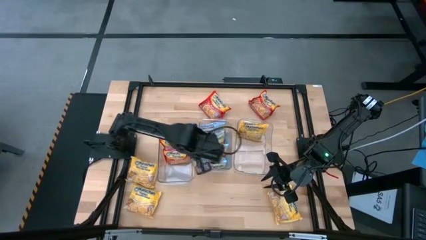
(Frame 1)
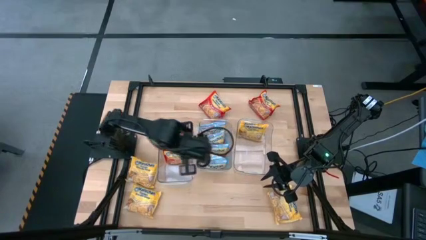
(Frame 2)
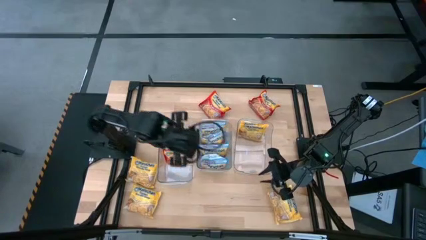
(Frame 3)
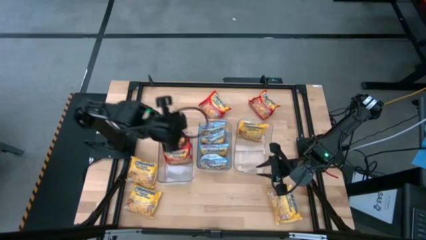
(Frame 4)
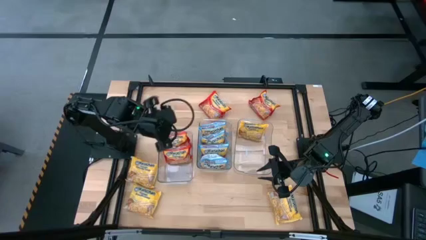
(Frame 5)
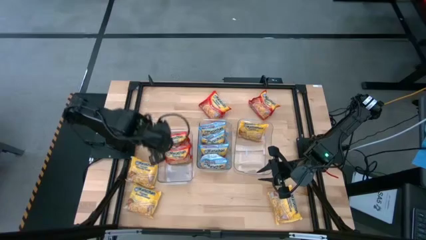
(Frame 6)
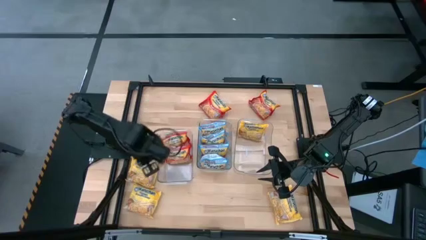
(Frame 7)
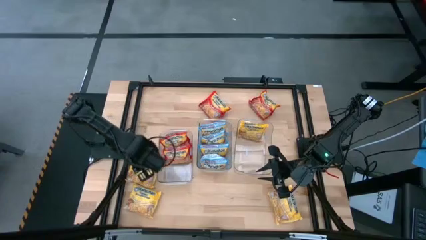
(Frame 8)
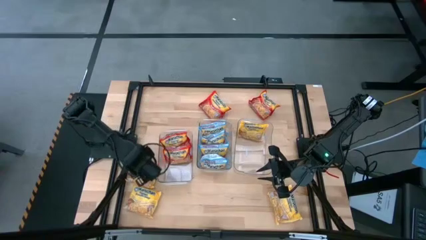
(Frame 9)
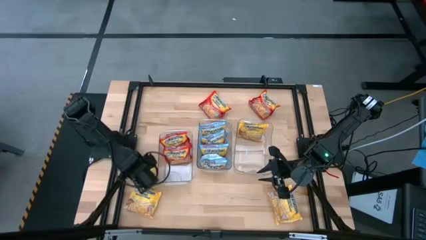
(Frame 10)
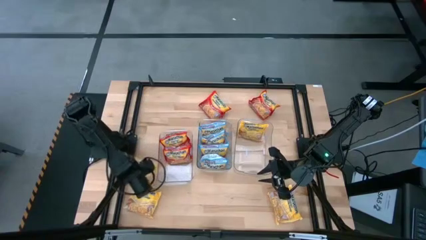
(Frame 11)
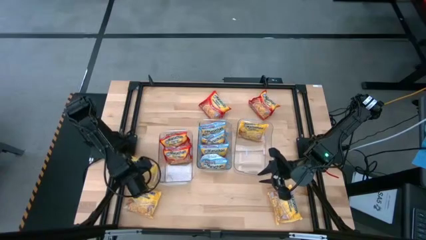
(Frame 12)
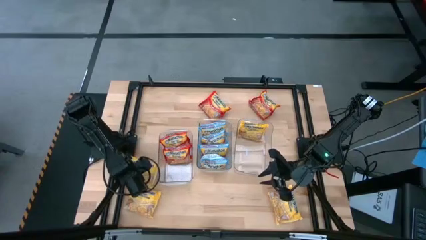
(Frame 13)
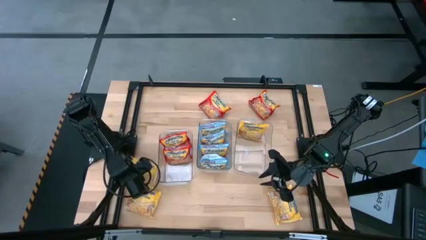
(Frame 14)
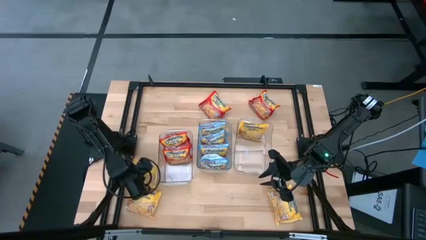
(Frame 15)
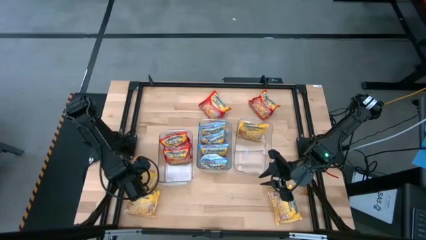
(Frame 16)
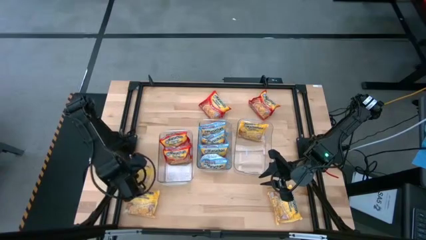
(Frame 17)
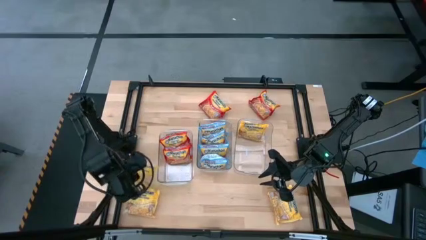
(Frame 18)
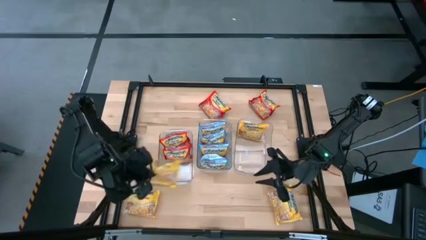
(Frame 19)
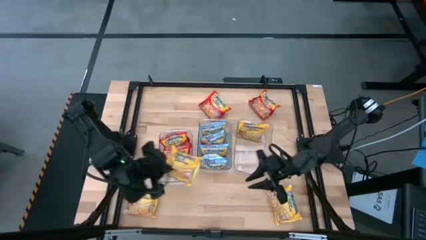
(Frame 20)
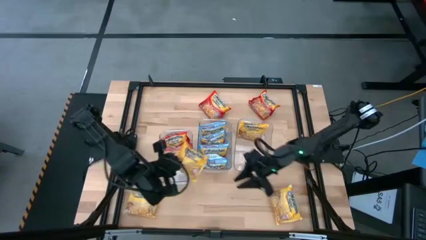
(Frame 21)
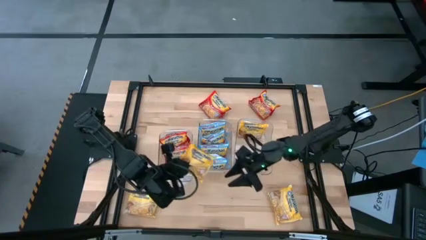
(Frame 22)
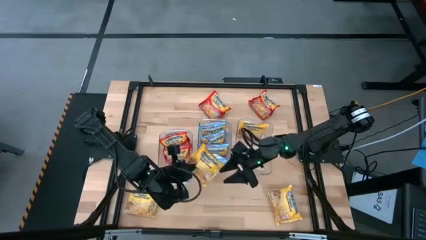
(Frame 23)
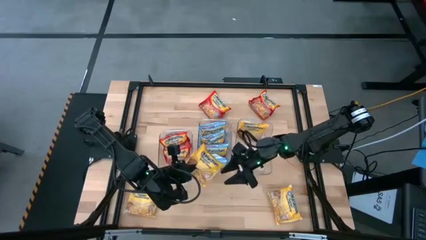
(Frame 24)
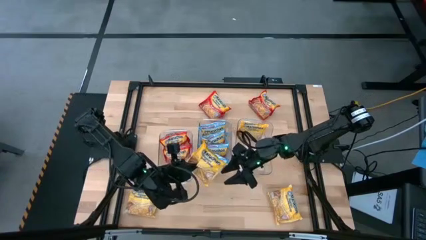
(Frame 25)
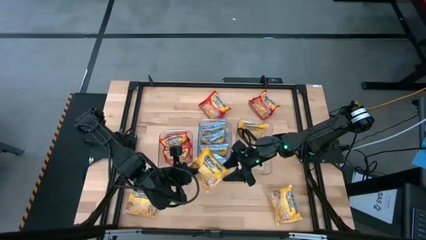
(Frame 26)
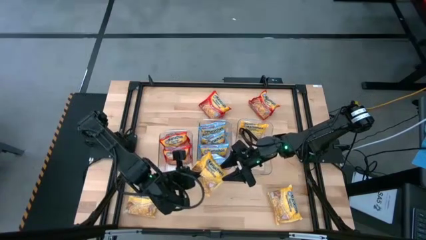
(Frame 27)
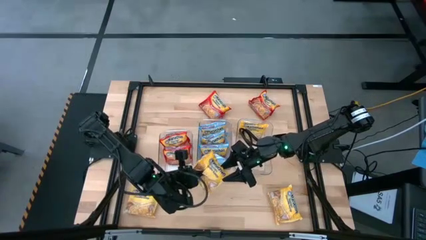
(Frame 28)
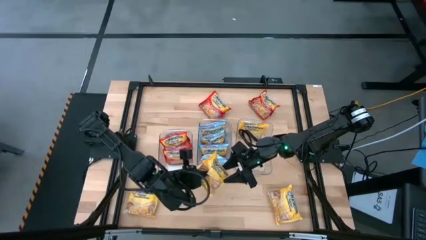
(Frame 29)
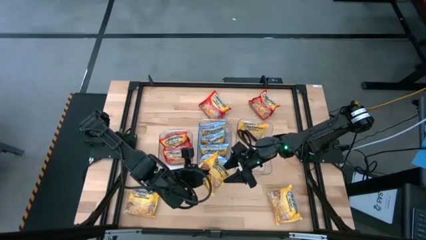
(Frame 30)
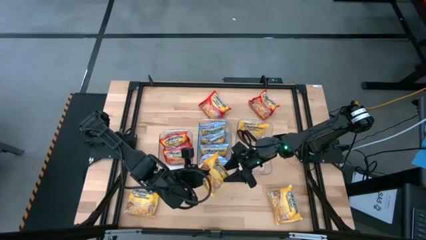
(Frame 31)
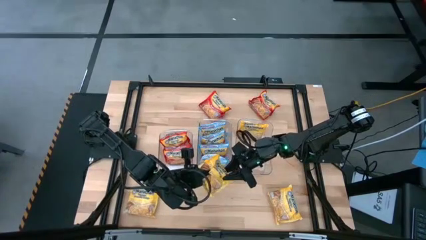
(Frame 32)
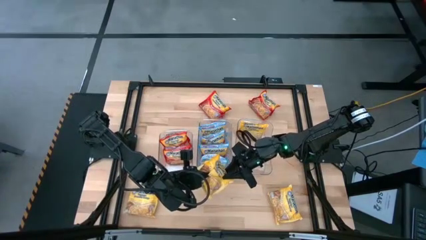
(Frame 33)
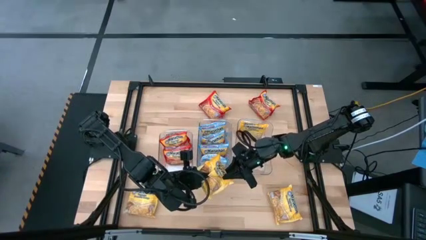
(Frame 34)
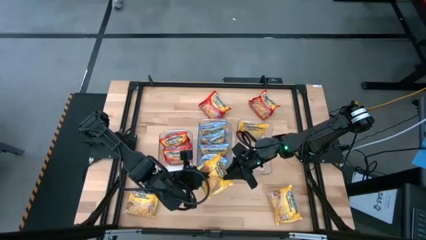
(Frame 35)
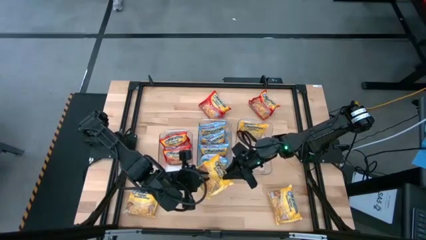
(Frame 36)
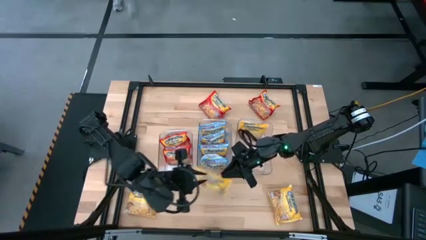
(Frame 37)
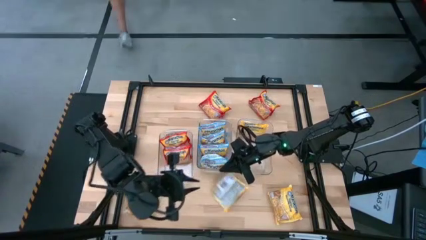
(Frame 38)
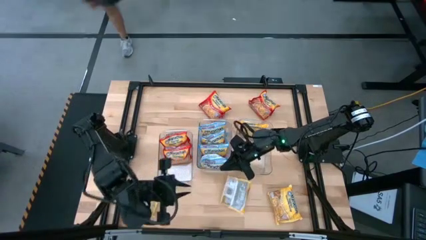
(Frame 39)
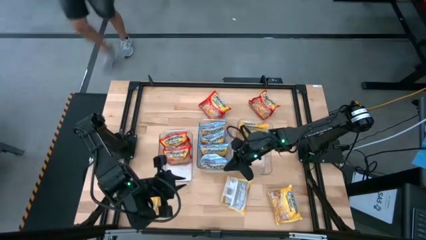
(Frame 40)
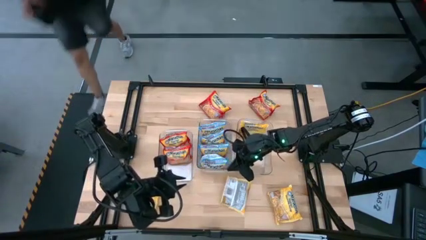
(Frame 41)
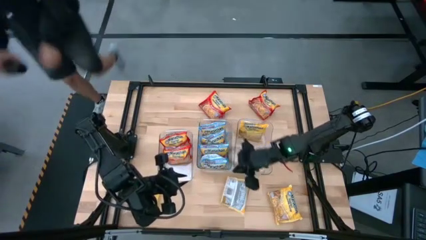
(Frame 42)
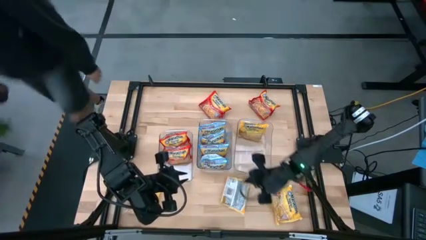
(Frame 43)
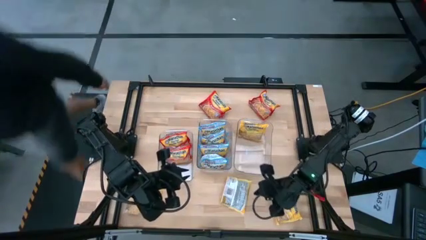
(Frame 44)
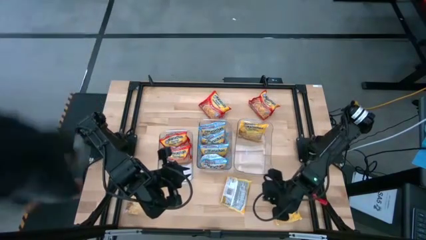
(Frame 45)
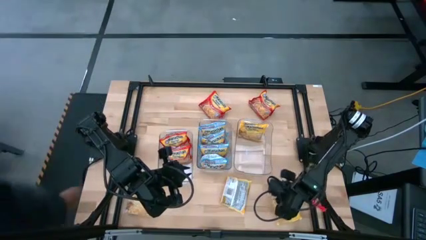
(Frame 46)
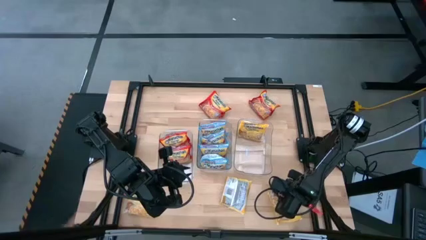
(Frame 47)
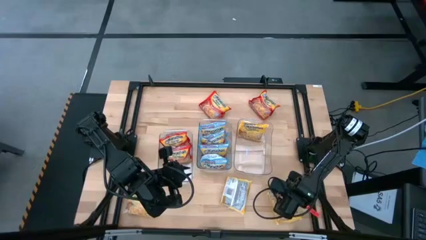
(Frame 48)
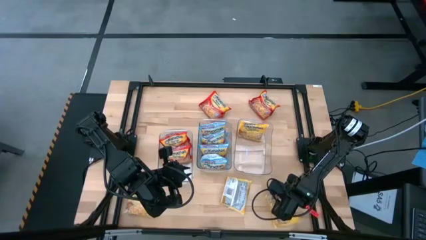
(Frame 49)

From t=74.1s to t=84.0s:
Task: Sort Maruchan noodles
Put the yellow noodle pack into the right transparent bin

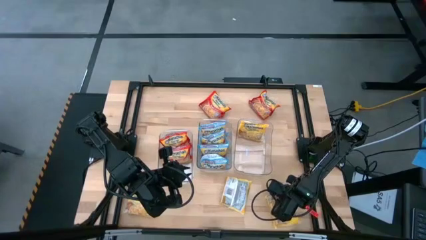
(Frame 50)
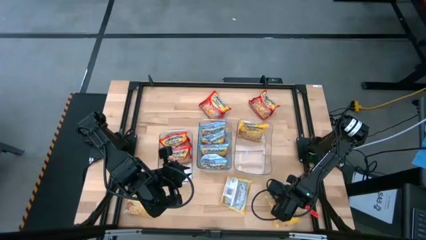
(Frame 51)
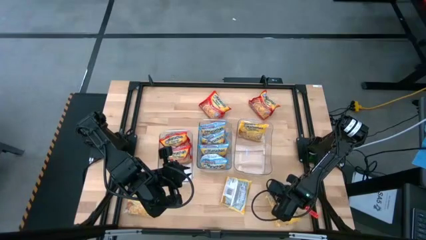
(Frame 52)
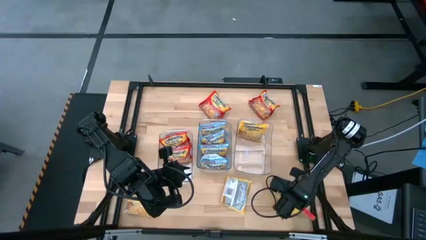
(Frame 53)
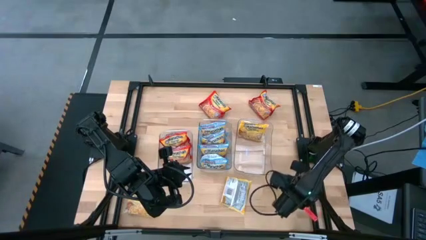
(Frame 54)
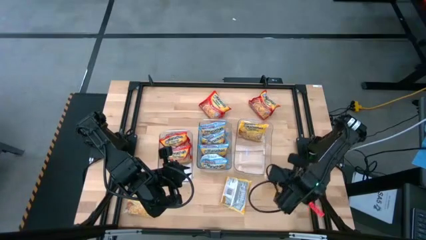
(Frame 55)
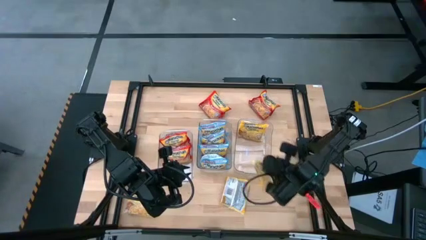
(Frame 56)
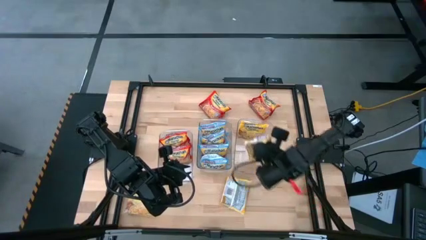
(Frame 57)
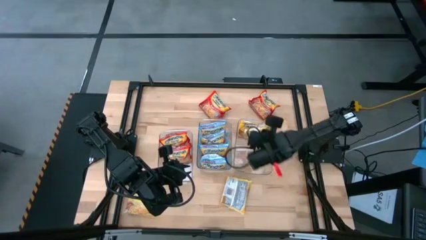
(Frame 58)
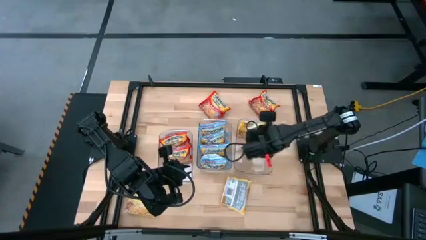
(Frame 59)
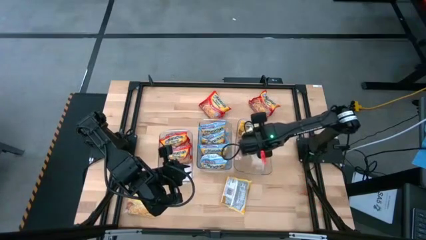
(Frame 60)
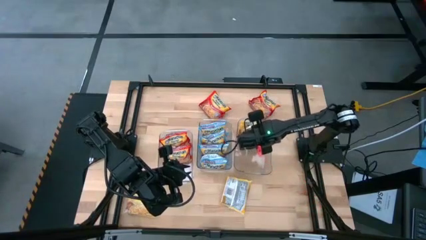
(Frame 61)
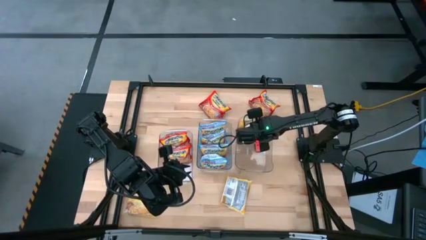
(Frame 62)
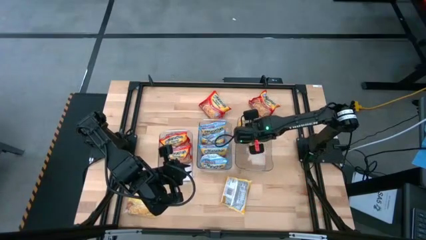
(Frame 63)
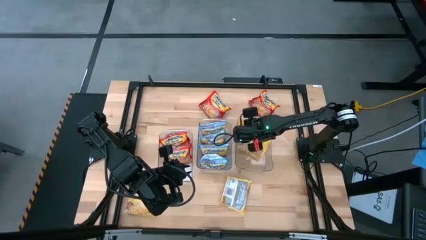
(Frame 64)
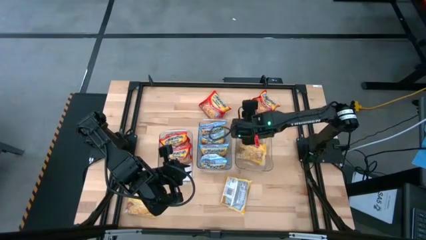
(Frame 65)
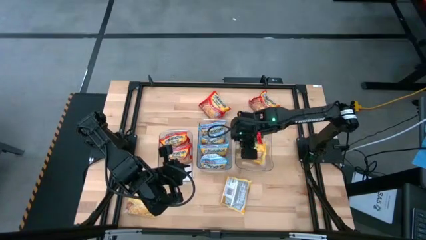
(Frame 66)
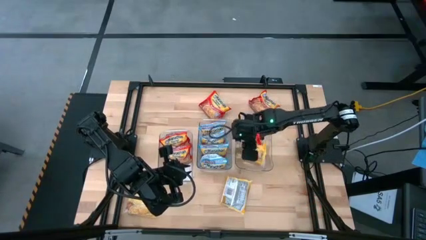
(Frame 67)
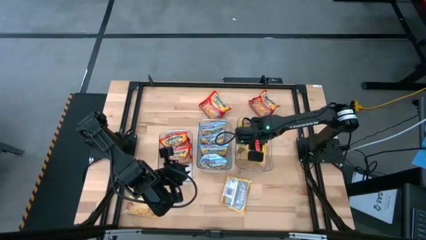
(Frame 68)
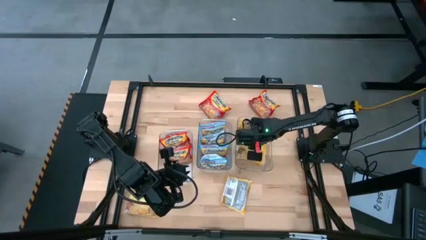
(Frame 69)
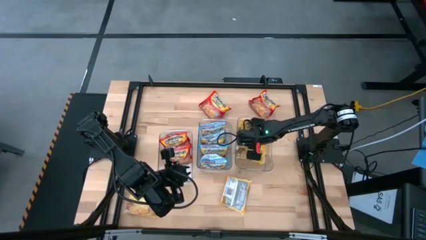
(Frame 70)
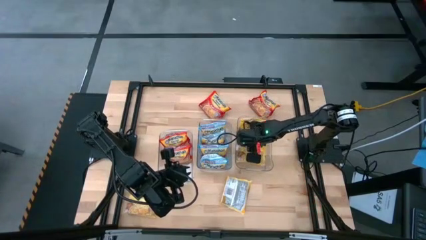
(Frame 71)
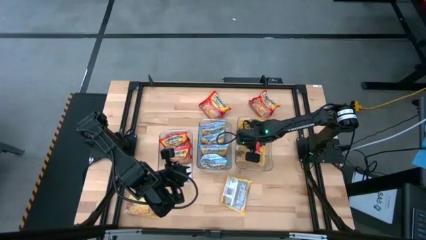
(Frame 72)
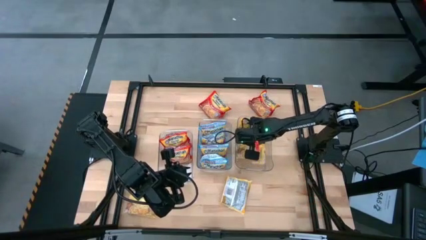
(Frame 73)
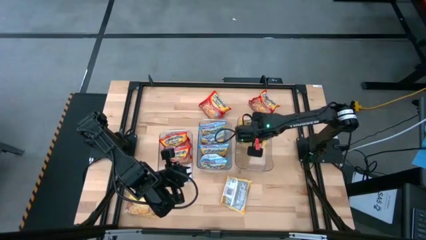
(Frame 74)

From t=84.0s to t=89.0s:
Put the yellow noodle pack into the right transparent bin

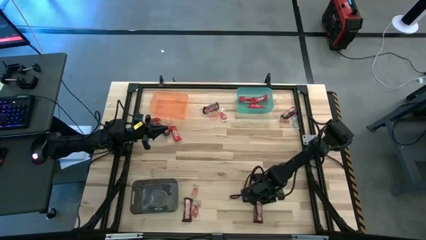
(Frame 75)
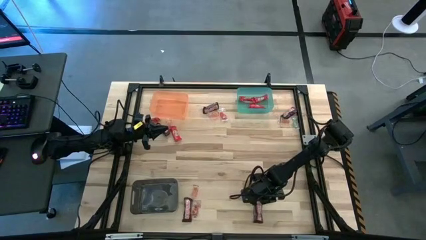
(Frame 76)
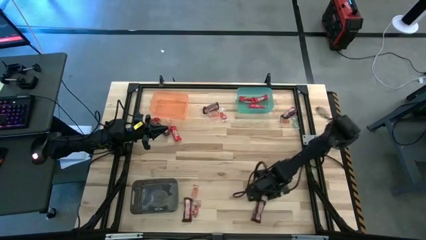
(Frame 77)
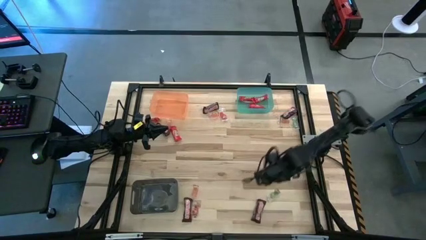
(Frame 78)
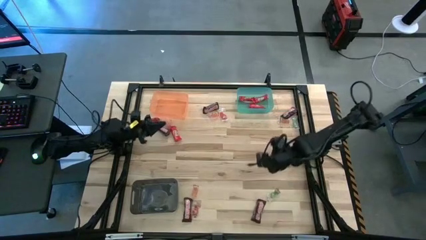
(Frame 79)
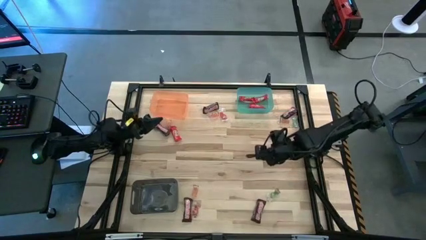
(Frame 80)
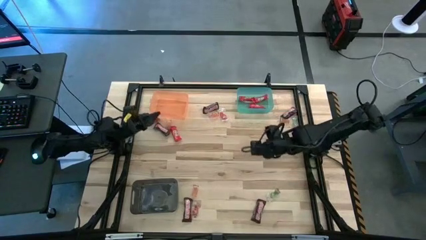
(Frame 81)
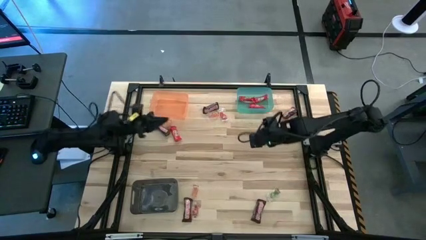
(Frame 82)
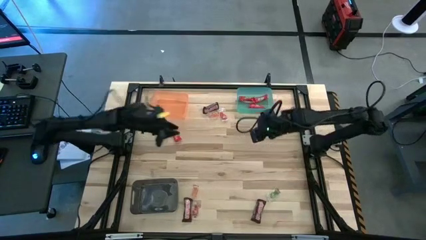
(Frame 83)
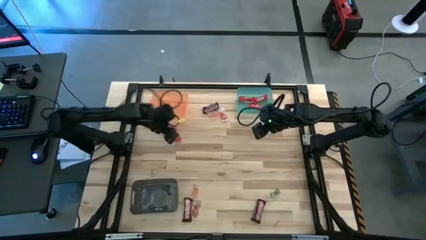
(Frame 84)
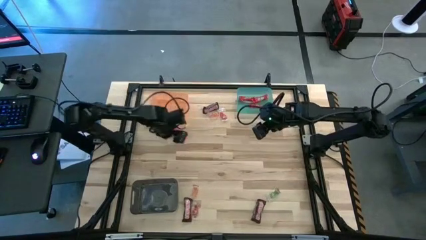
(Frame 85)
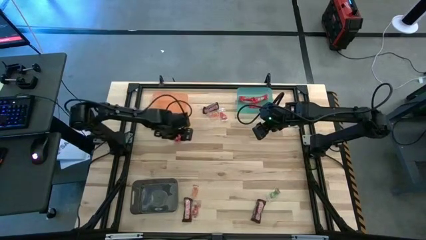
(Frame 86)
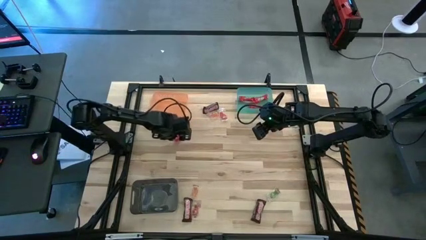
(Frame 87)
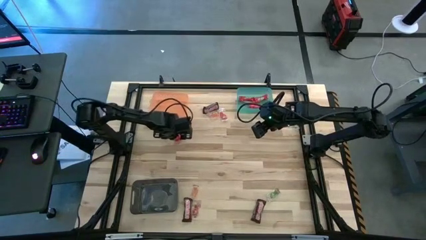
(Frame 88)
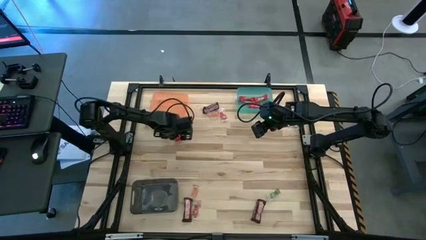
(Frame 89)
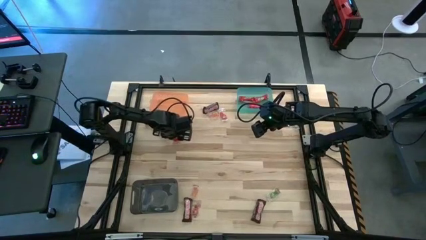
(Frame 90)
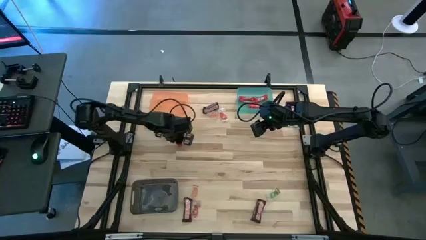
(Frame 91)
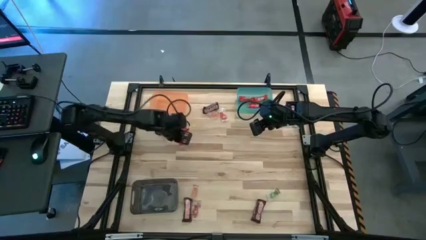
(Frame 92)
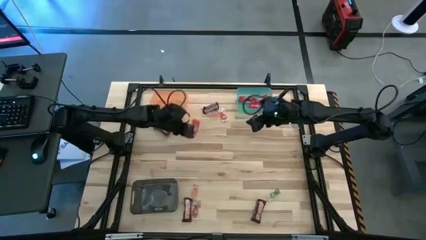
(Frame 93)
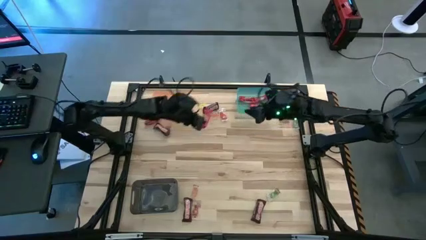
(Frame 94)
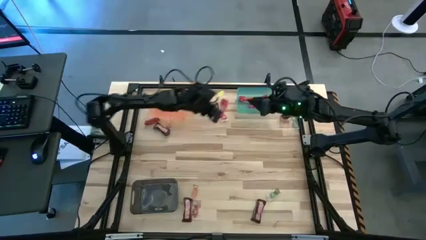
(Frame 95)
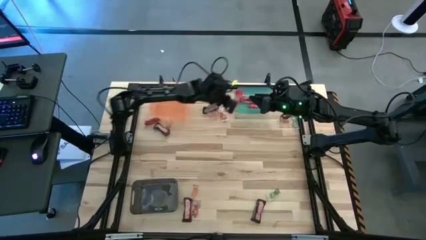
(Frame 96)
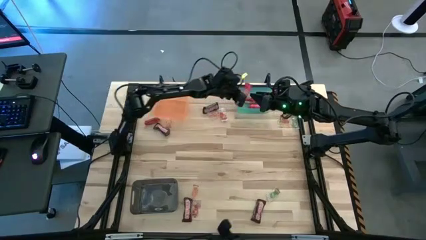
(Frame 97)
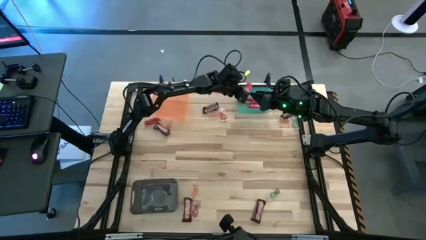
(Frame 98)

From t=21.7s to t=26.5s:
Task: Sort candy by brand, put in halloween buckets
Put the red chocolate bar into the blue bin
